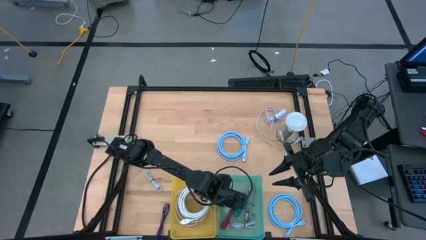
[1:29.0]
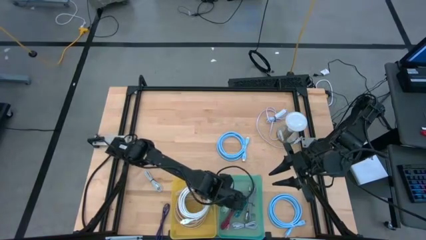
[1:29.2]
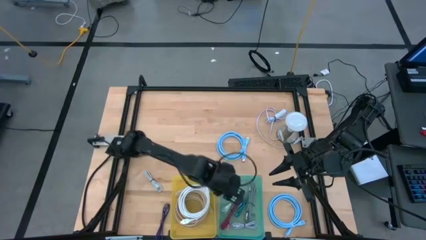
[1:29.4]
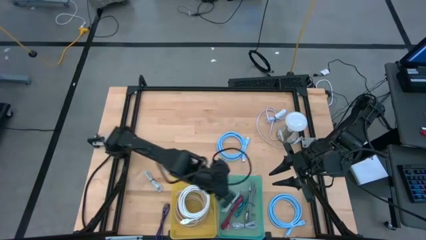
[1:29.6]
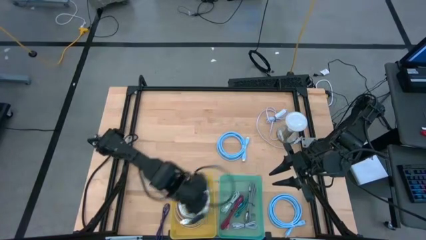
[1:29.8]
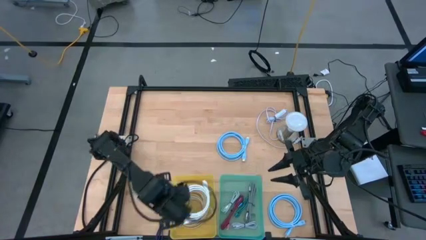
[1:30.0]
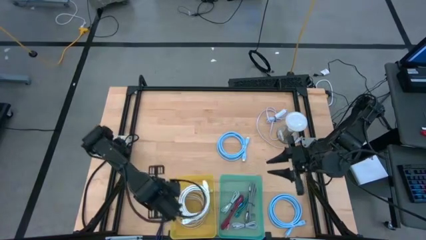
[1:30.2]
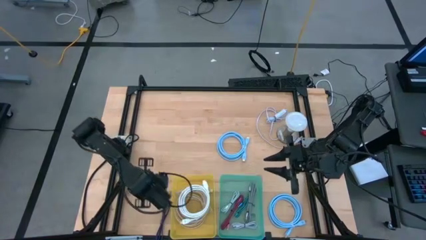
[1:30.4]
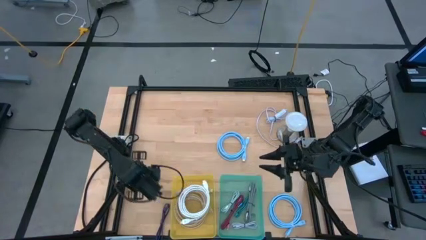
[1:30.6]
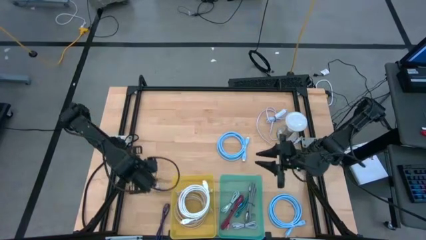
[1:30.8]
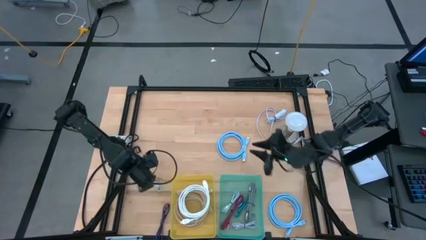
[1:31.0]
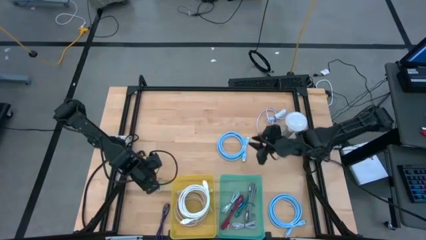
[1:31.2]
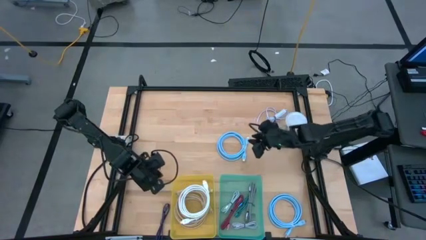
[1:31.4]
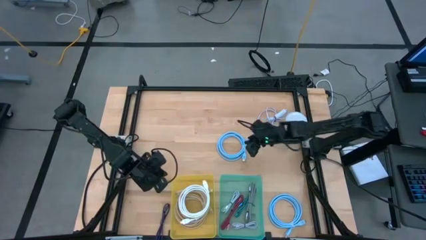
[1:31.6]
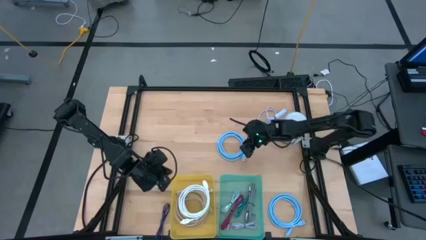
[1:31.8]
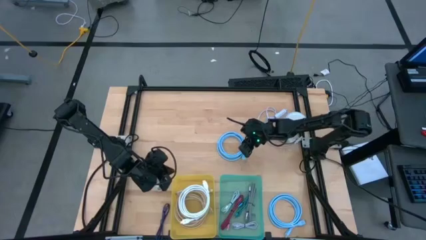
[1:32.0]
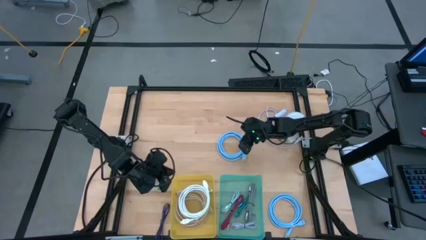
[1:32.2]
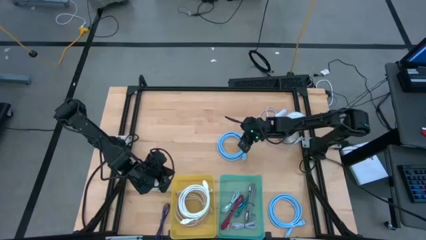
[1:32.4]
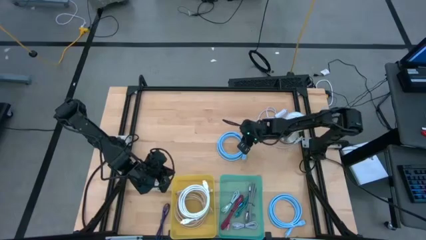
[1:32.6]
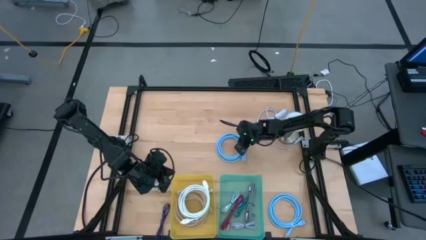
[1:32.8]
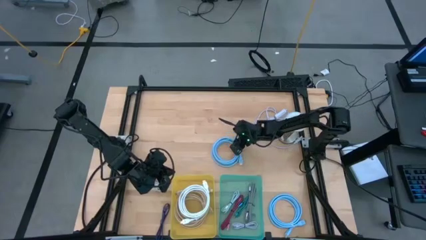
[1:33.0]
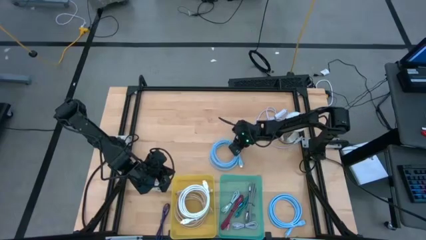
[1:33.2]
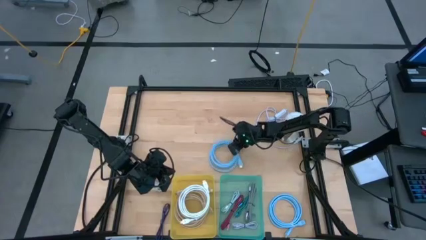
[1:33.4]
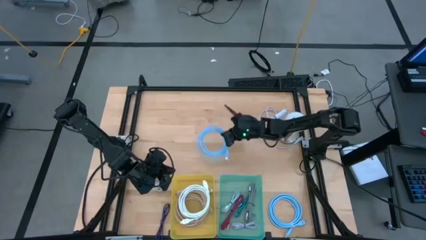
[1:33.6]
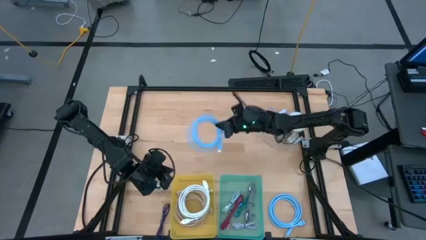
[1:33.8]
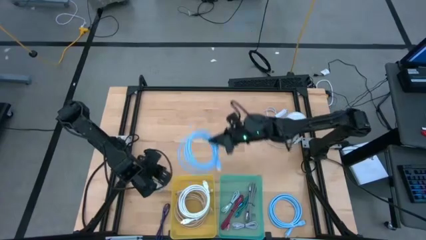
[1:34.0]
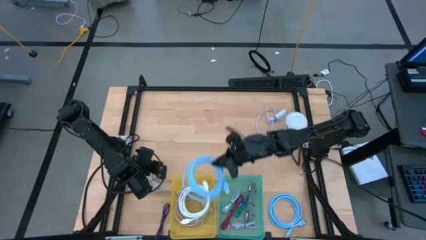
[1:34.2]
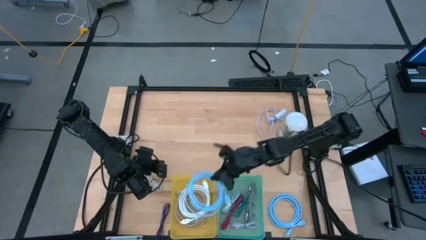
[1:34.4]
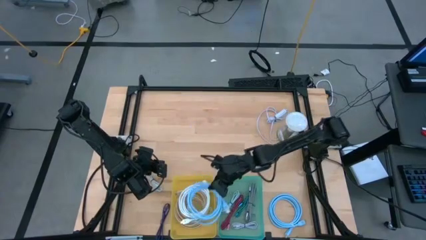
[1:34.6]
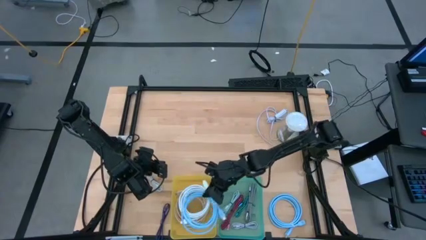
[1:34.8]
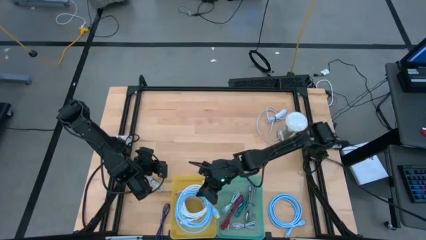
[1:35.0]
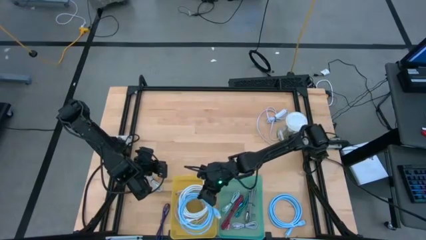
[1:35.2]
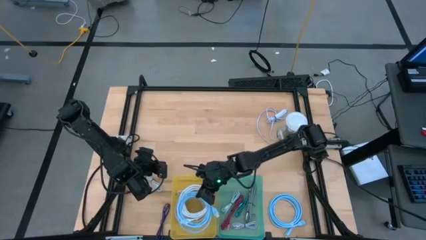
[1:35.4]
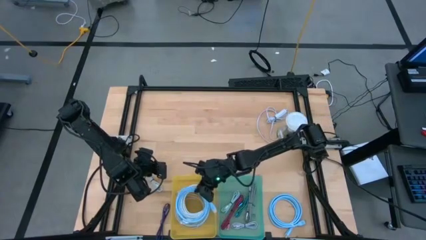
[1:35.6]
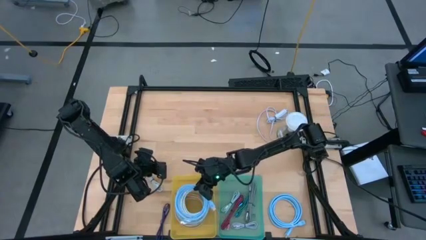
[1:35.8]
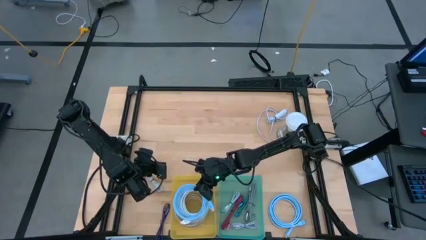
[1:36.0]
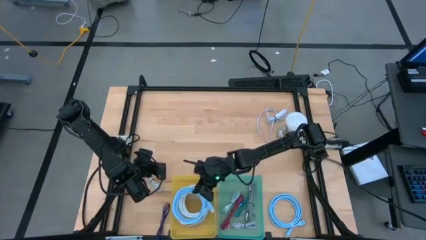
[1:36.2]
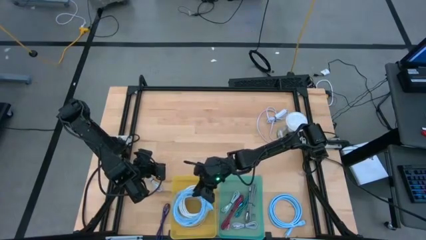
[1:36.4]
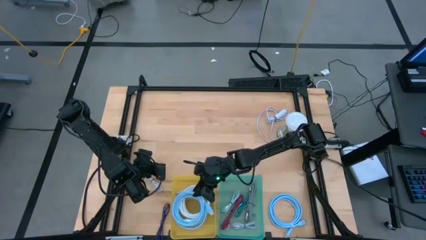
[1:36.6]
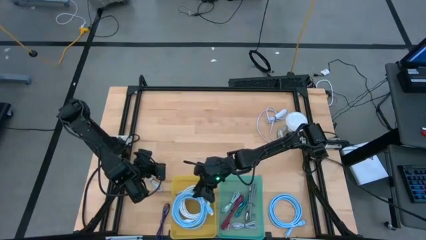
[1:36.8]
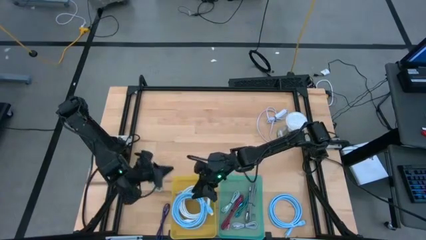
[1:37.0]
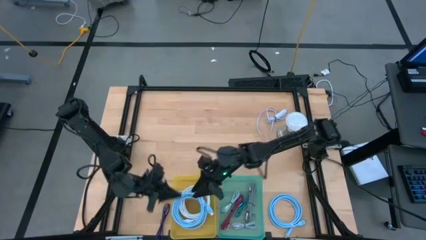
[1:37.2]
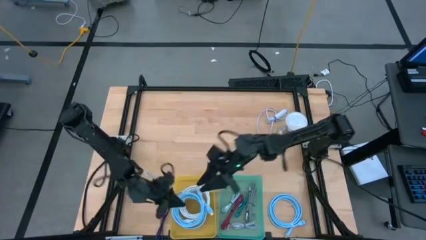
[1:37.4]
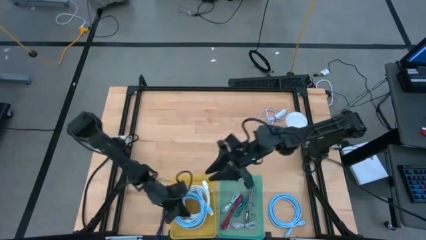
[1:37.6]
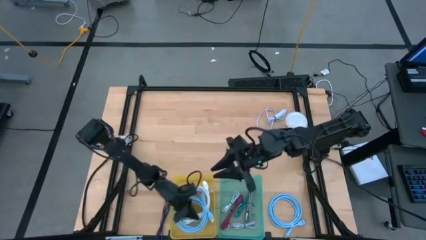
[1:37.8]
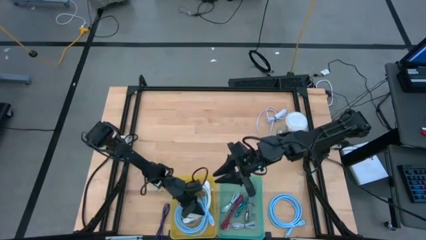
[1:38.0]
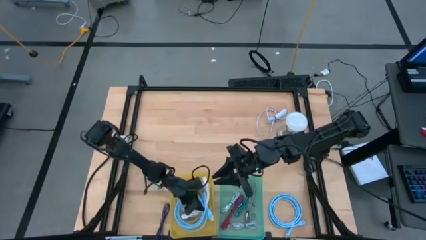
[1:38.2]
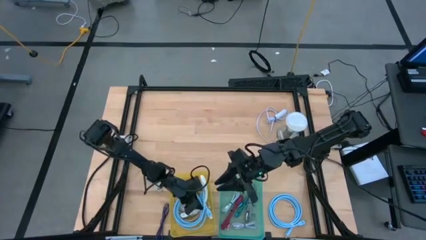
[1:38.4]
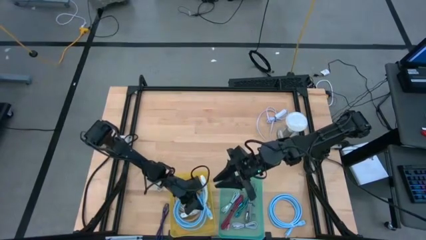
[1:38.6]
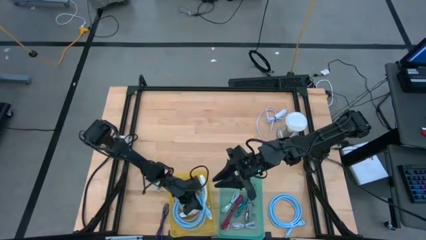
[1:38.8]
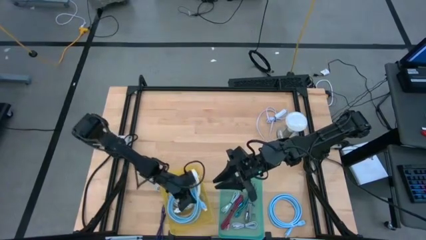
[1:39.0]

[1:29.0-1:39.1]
Task: Pick & Place USB Port
Put the top large blue charger into the yellow bin

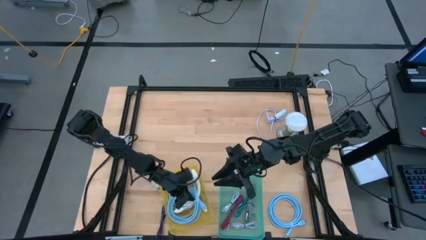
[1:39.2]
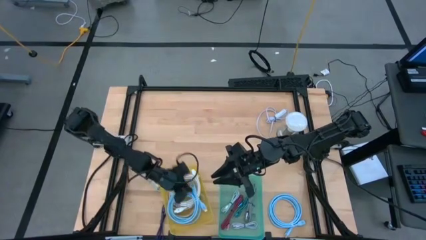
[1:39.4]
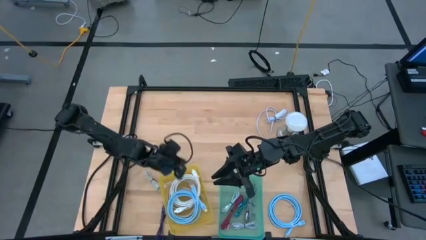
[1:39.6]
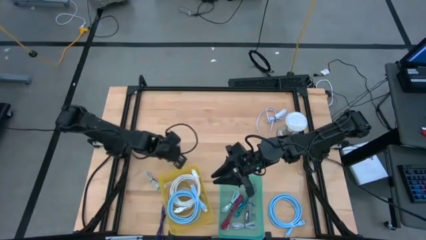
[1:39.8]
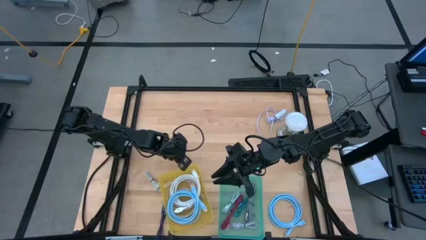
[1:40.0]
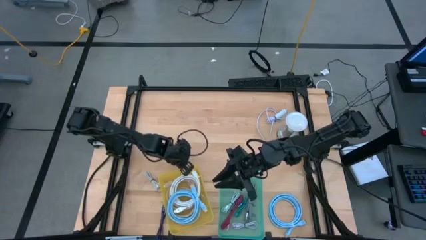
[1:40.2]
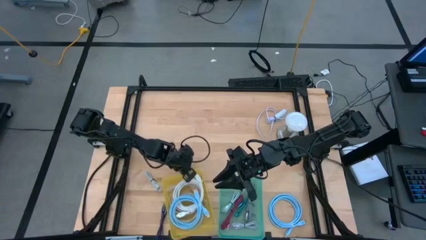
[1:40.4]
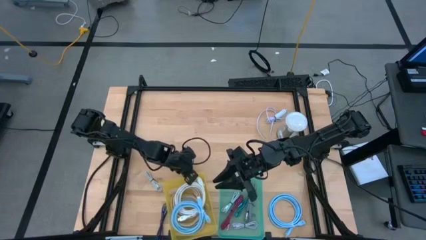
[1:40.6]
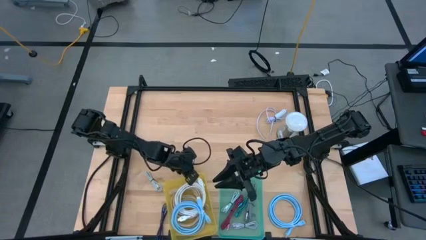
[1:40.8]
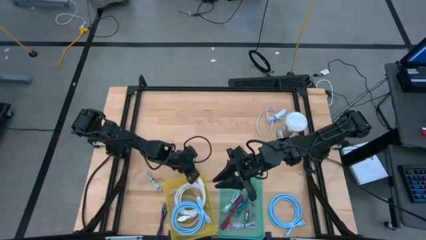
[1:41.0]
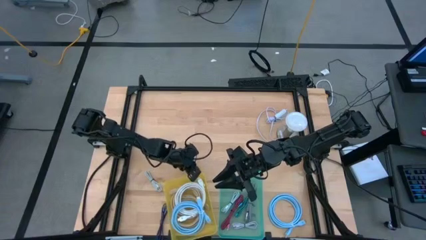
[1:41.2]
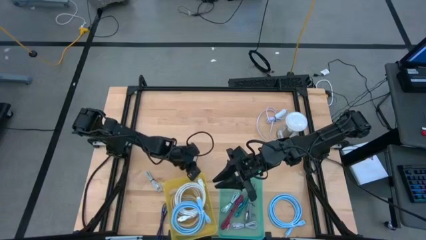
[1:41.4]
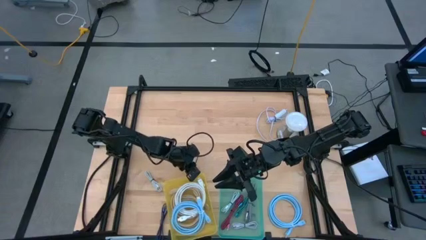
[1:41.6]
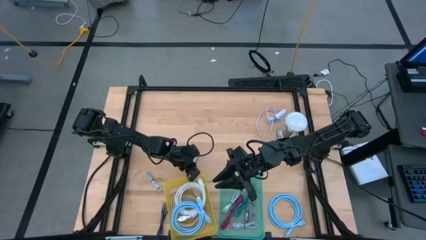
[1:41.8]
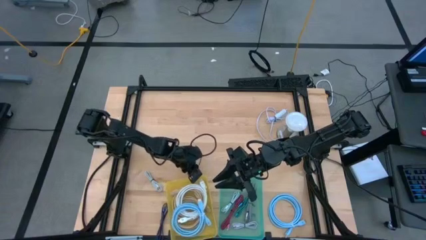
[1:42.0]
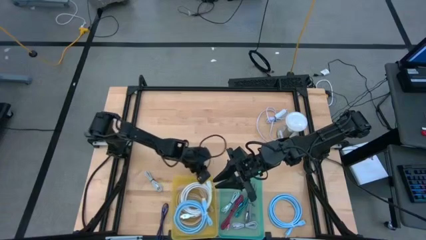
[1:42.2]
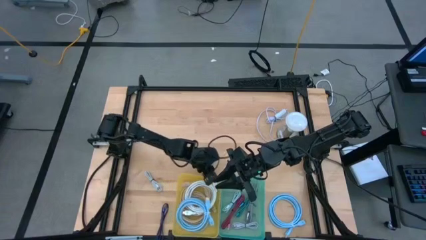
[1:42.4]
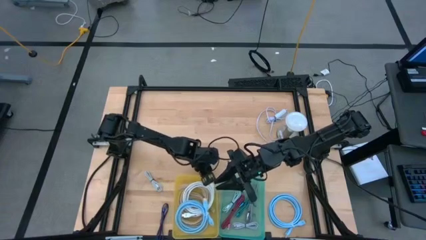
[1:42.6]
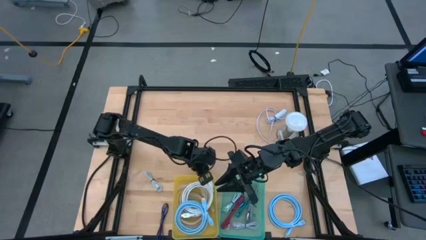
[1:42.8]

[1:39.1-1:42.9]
Adjust the yellow bin

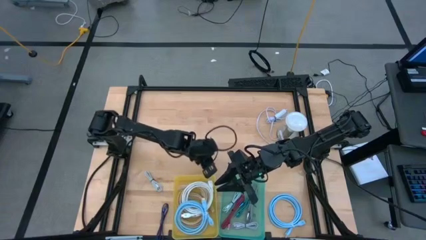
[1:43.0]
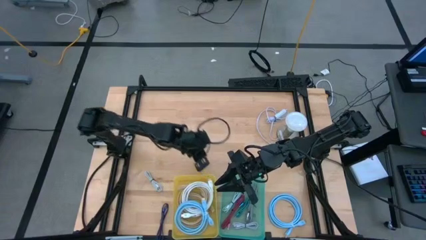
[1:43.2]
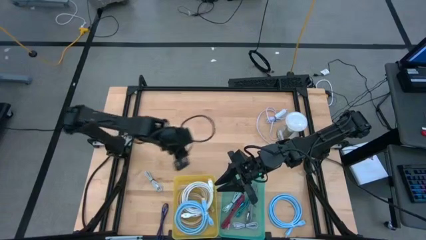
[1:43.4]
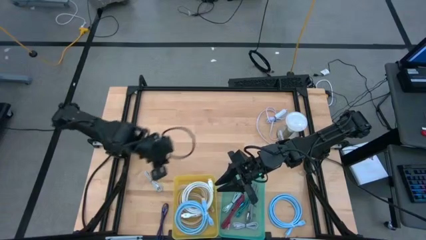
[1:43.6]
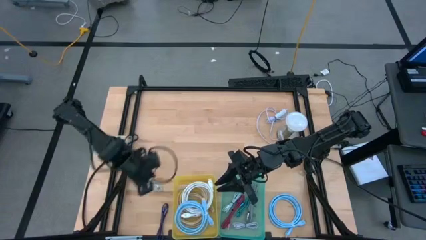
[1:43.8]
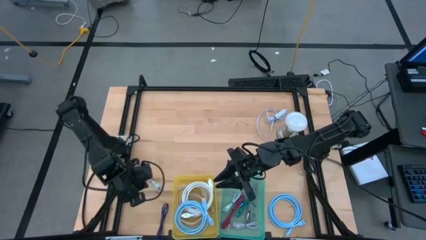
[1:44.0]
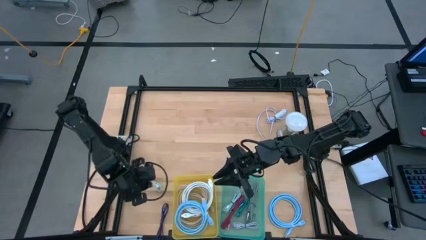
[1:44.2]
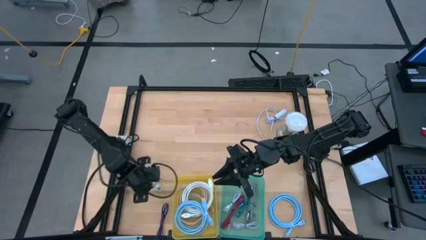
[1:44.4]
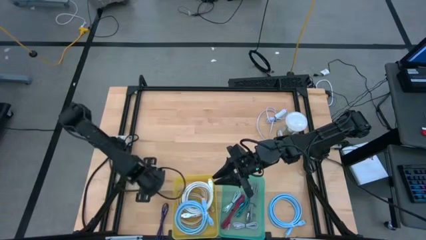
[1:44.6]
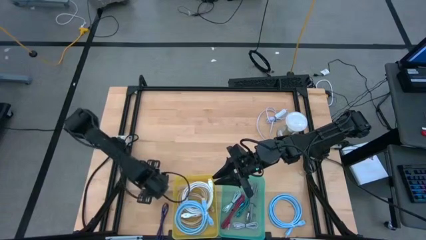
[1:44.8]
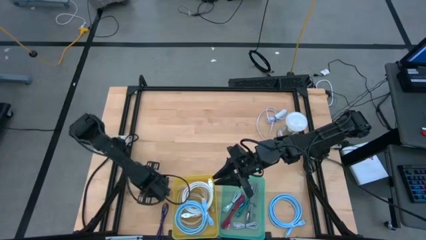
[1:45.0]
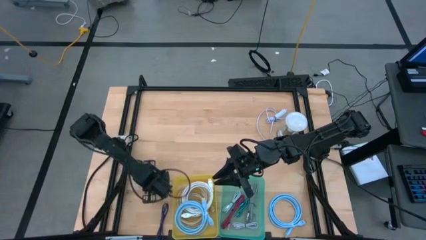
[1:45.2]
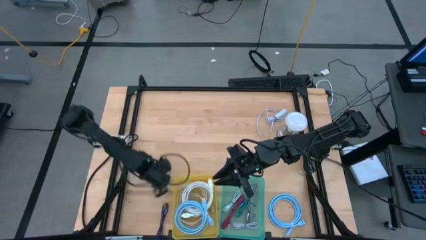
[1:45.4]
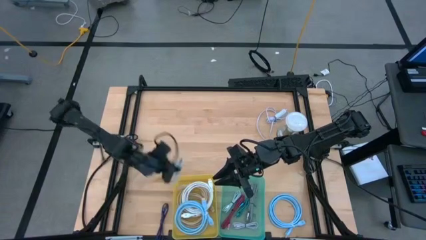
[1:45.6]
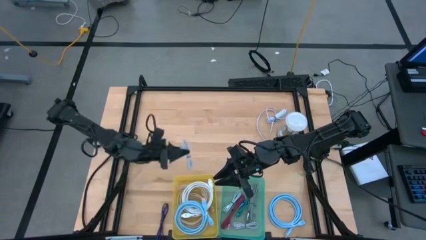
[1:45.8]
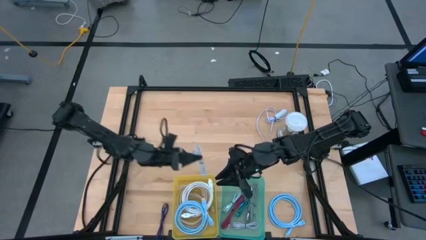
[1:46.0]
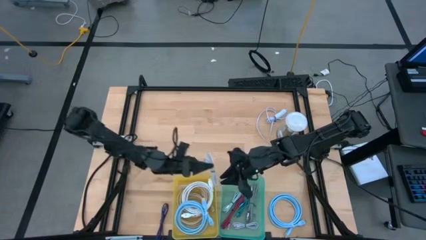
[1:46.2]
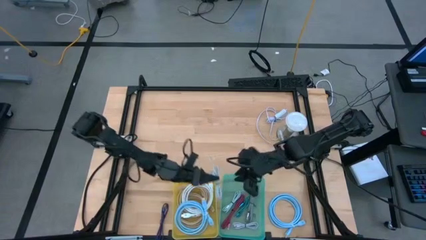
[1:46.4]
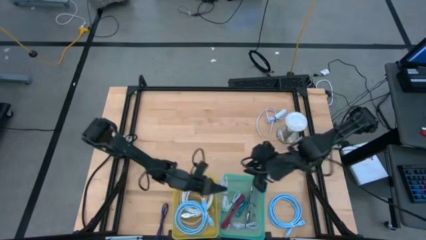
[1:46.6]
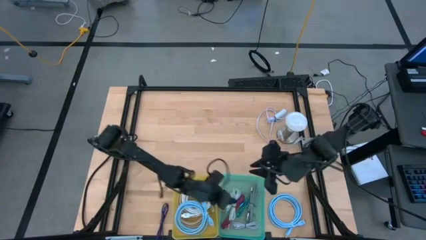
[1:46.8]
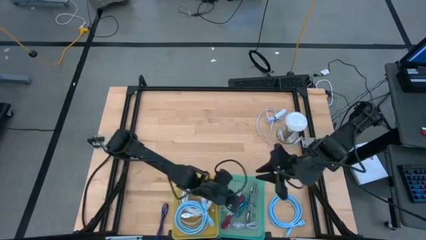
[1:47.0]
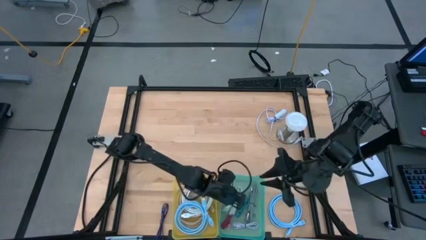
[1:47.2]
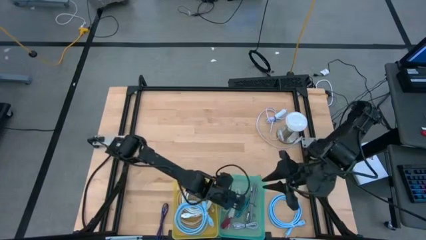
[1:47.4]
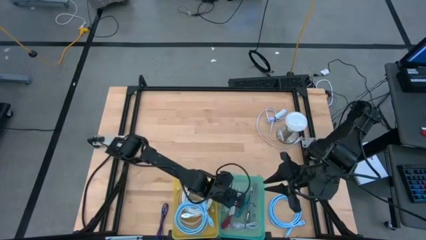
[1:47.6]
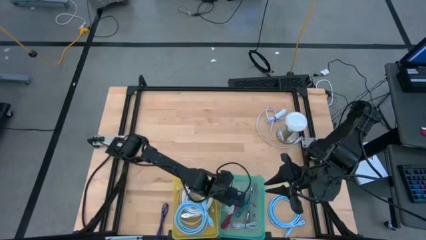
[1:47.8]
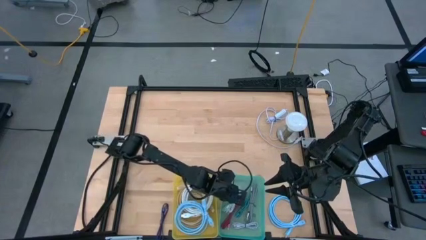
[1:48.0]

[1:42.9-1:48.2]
Put the small white charger cable into the green bin
